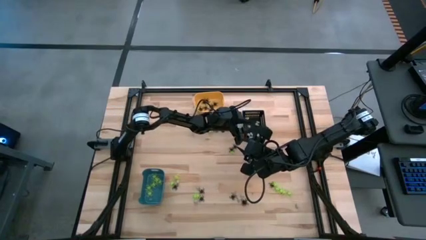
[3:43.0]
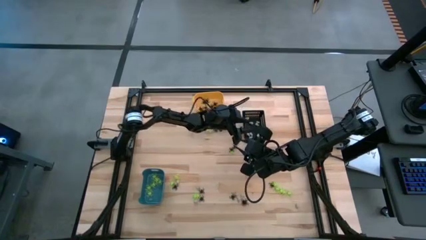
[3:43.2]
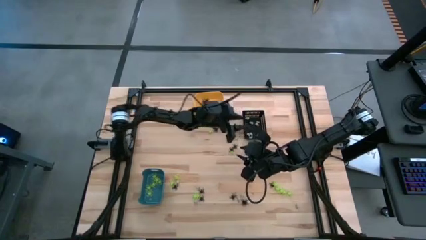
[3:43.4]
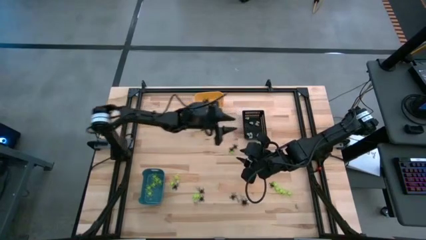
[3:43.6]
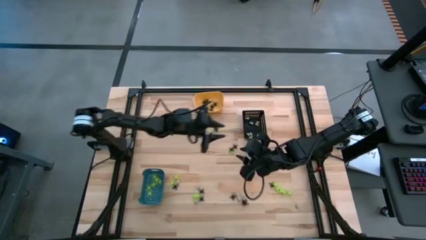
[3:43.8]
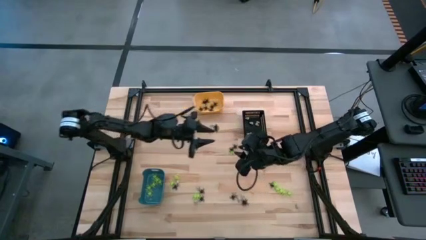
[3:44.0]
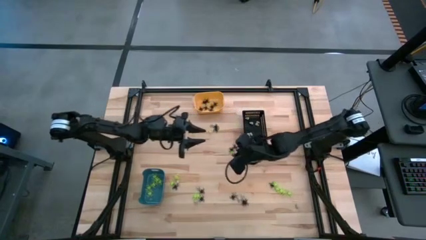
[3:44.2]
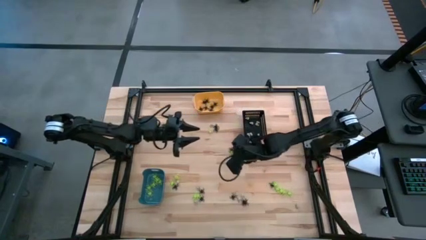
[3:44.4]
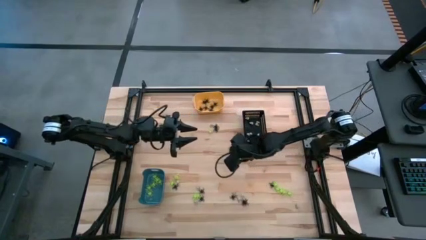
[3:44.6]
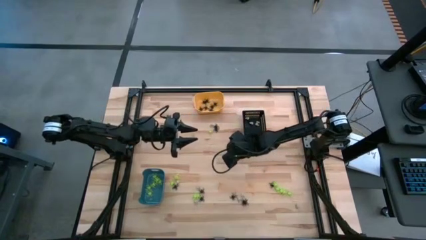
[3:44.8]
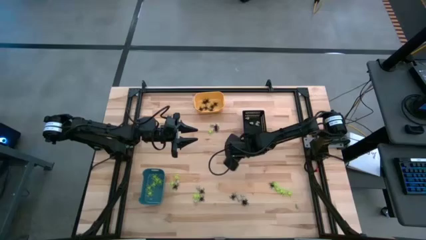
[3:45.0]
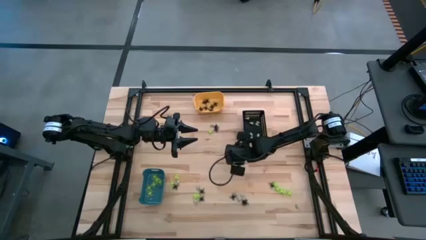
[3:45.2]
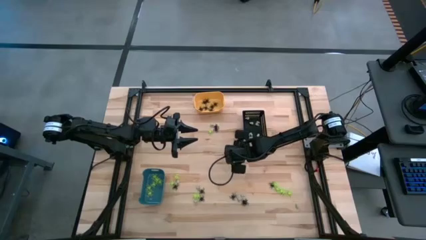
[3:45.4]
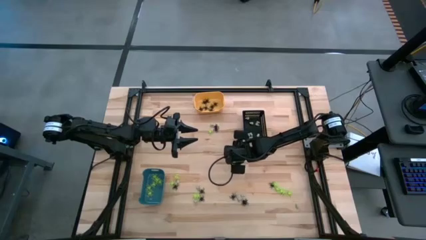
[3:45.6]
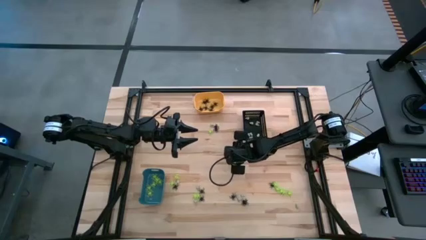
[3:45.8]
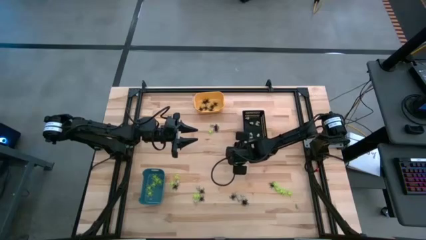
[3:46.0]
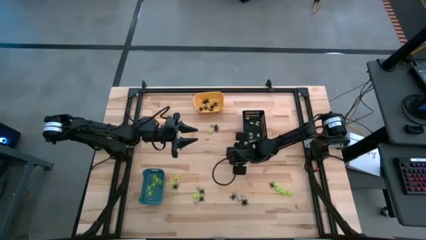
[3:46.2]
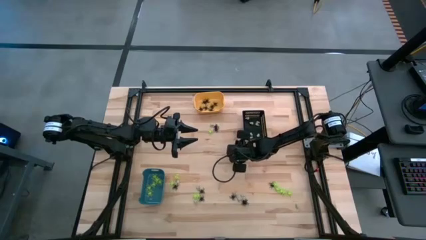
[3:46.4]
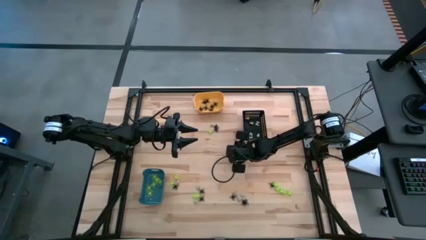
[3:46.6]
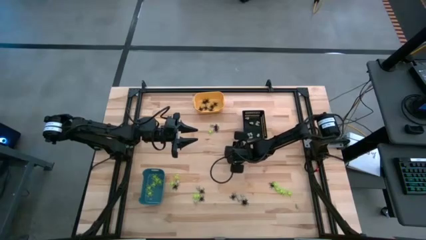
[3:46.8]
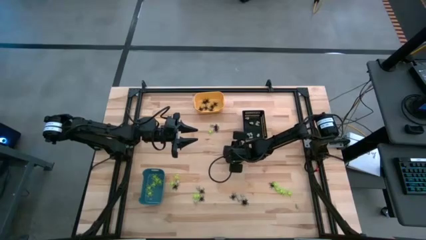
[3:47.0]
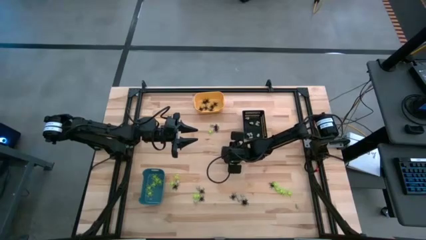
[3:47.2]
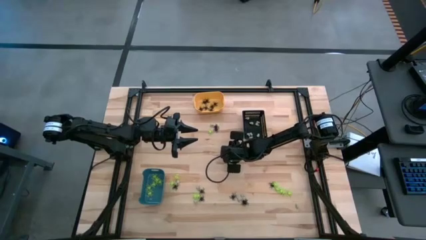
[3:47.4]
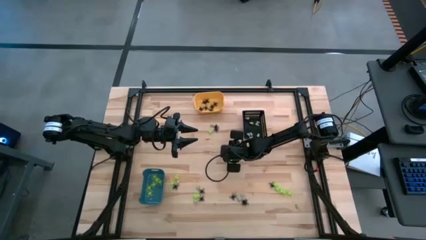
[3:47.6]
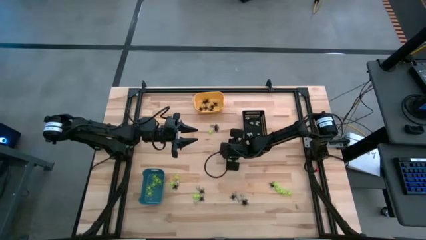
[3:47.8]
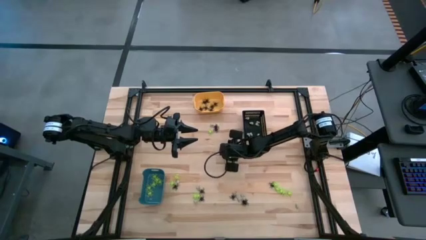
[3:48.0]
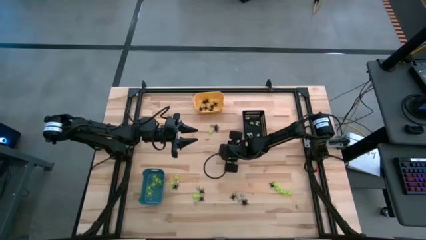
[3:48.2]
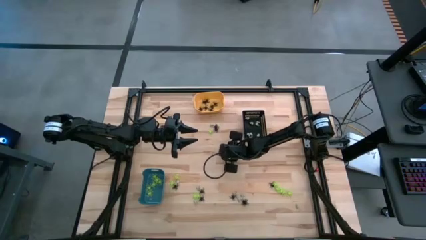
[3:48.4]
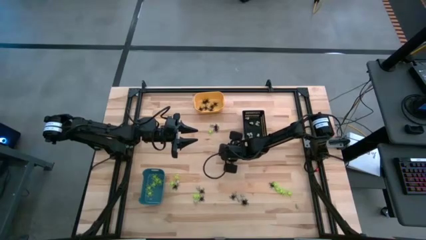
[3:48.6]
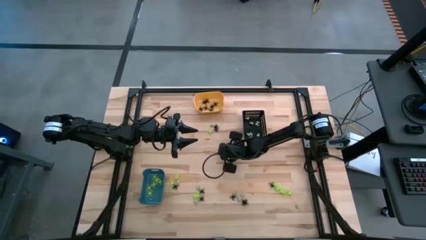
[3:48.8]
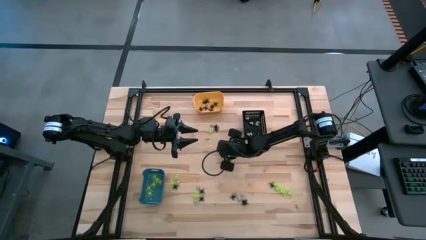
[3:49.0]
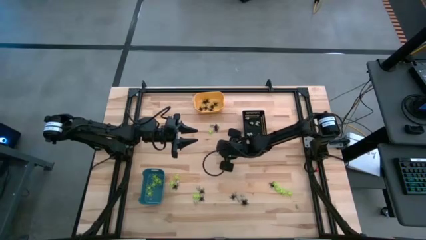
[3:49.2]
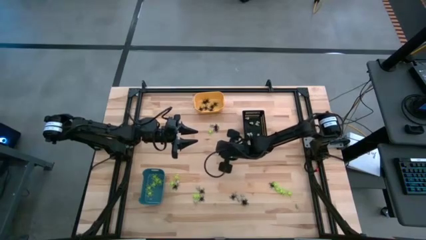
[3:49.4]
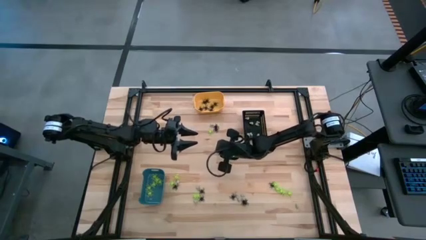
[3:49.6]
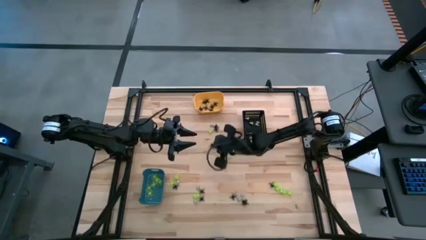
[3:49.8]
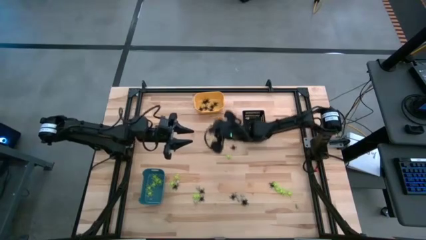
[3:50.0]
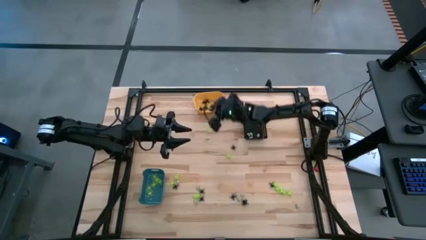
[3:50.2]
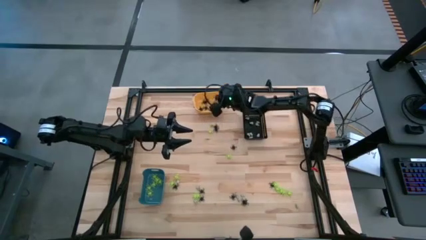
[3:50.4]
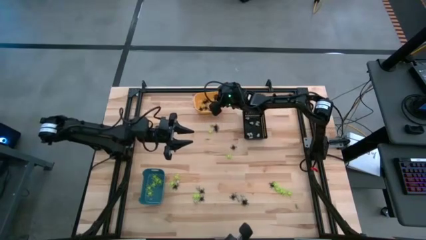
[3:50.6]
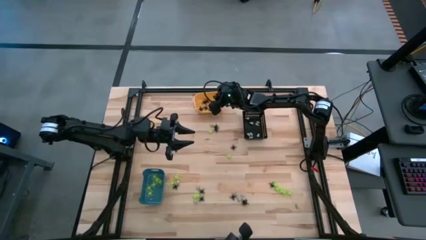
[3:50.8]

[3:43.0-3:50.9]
Task: Sort Halloween decoration
Put the black spider toy into the yellow bin

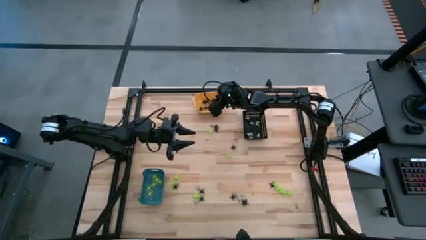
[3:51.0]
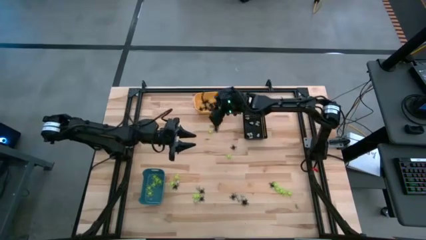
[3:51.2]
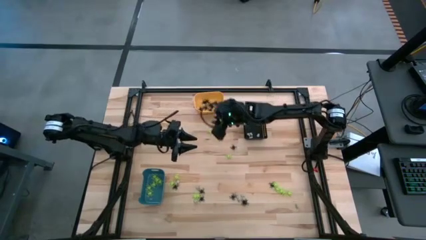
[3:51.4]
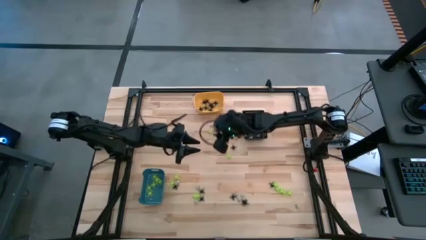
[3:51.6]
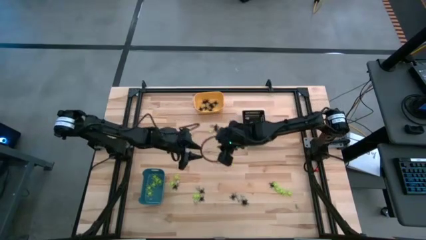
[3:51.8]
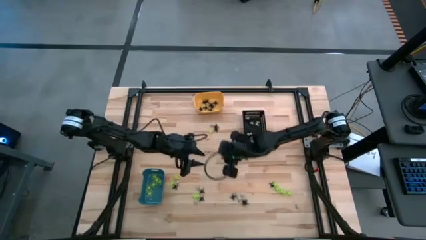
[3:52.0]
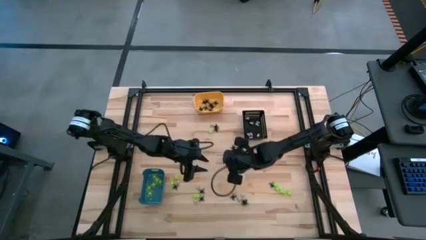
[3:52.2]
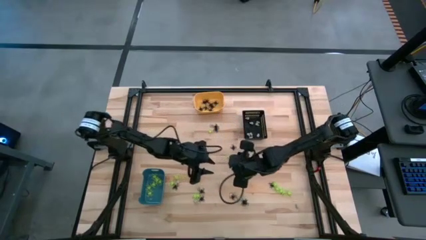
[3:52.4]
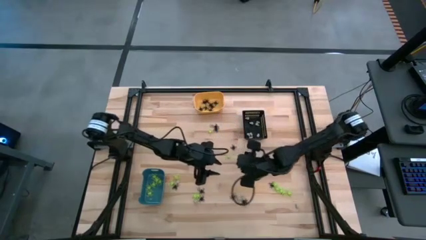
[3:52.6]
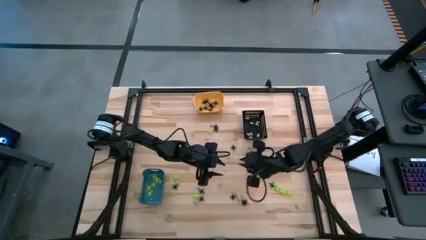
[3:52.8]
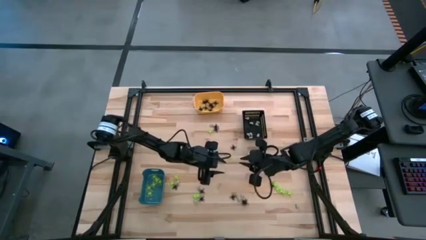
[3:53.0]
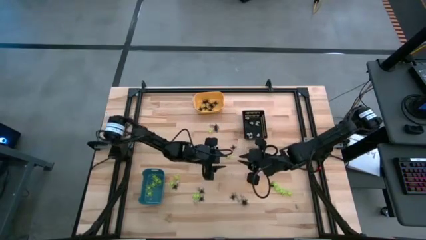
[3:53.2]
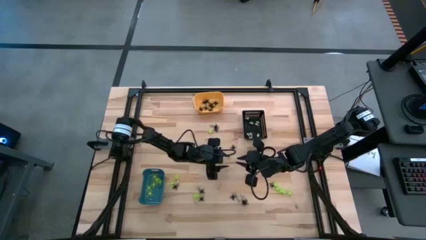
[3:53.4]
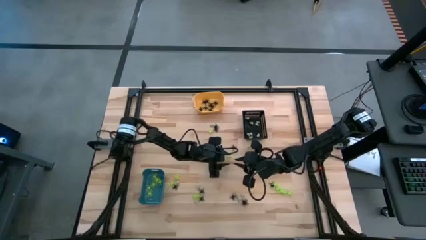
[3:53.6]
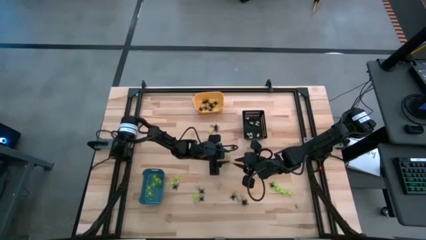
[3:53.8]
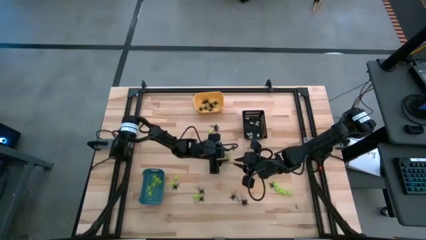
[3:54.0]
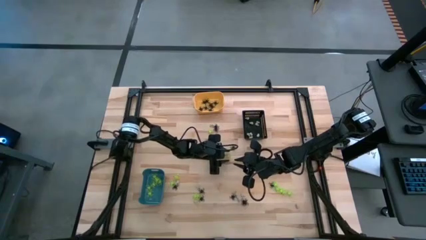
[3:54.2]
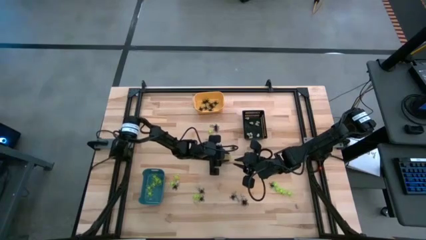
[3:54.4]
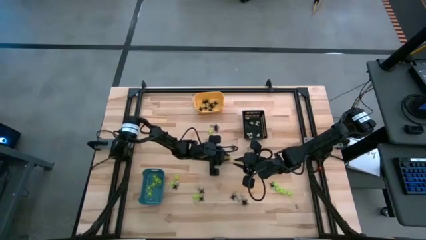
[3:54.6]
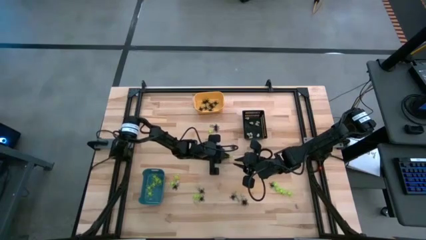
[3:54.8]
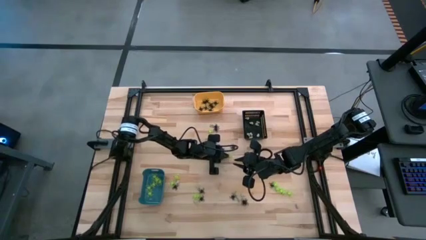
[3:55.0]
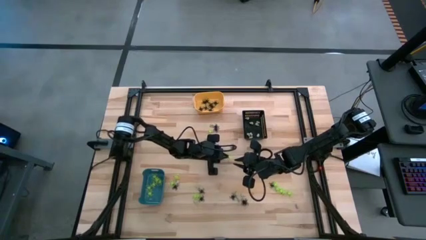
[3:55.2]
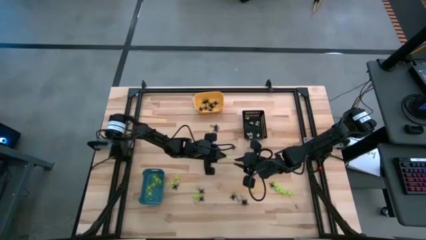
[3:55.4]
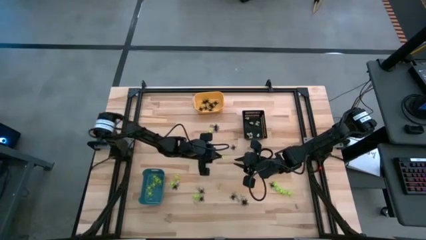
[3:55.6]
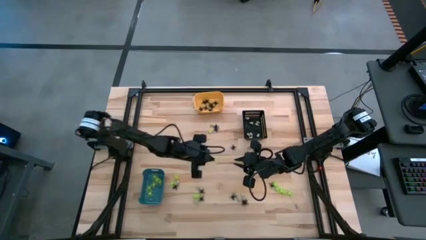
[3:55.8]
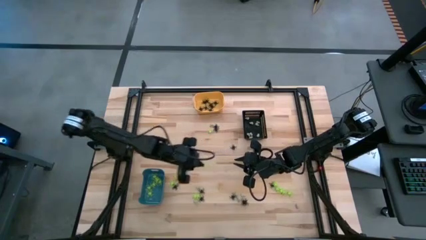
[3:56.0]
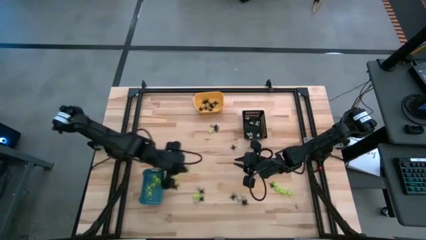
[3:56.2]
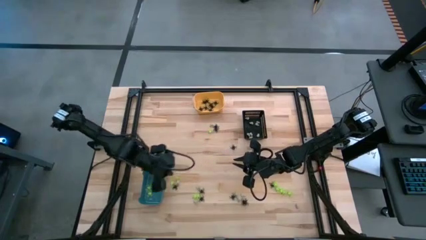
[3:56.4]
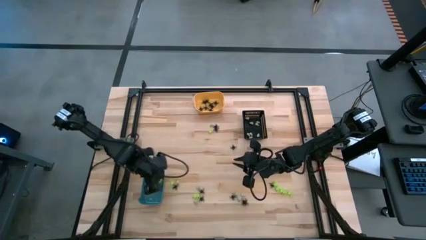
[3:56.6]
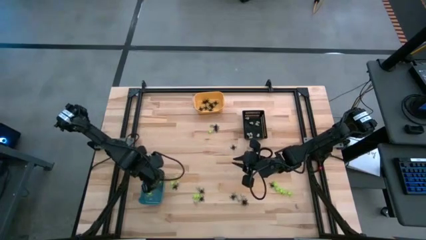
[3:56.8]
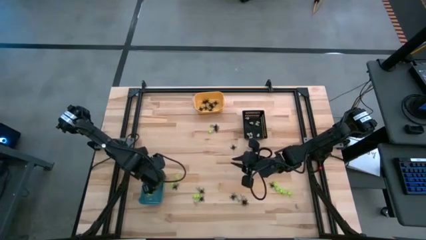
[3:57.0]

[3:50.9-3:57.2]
Put the green spider toy into the blue bin
